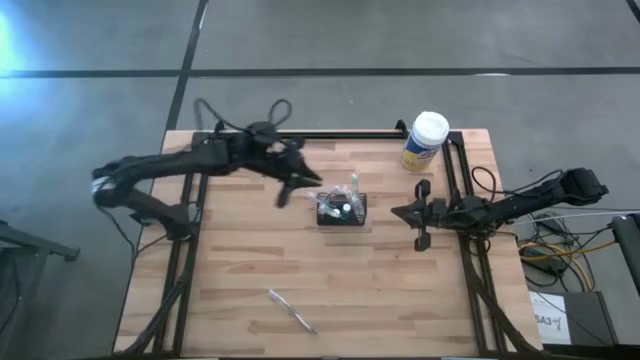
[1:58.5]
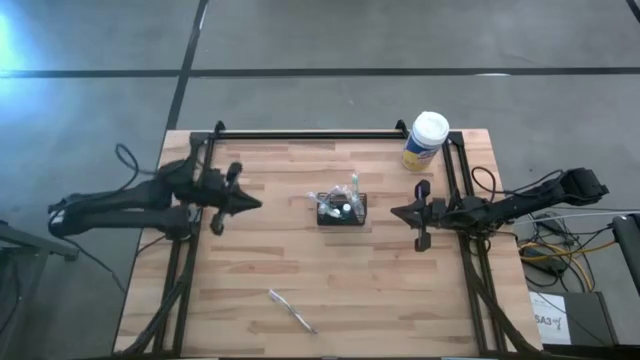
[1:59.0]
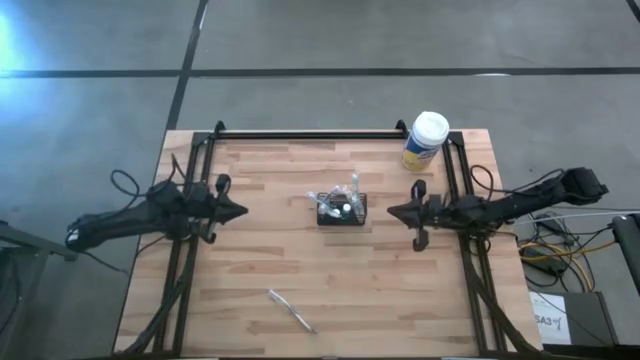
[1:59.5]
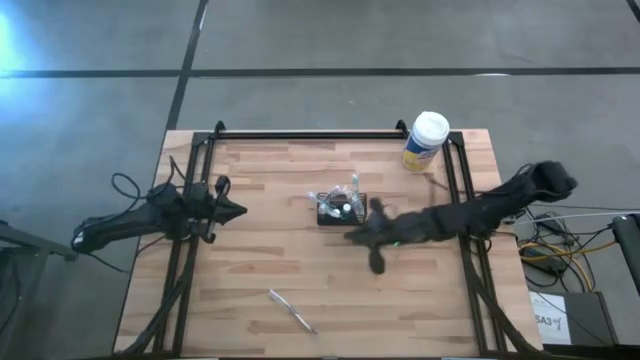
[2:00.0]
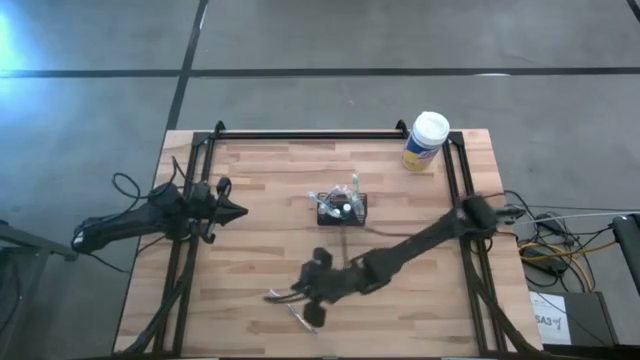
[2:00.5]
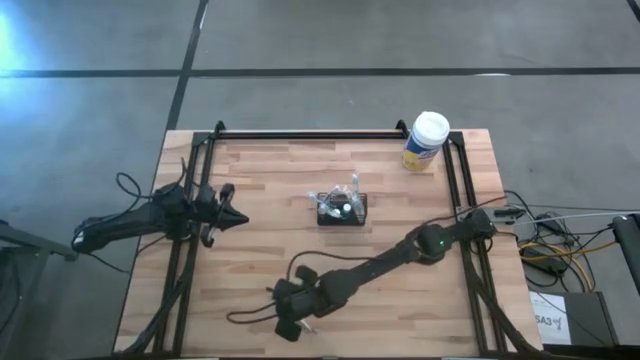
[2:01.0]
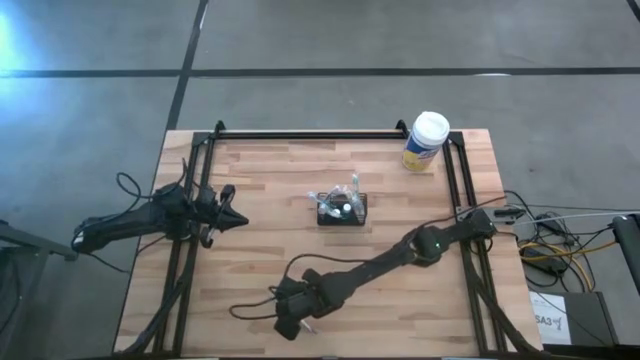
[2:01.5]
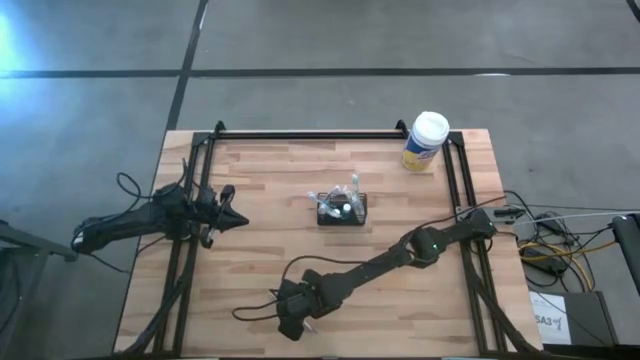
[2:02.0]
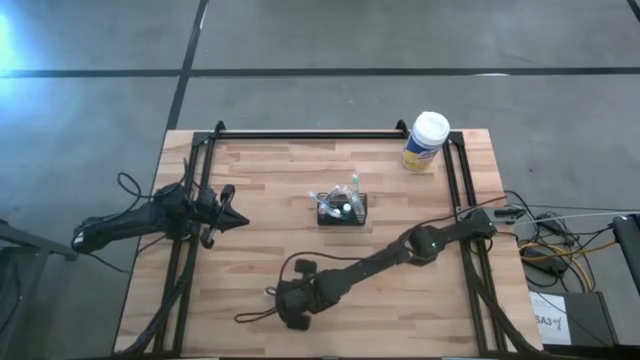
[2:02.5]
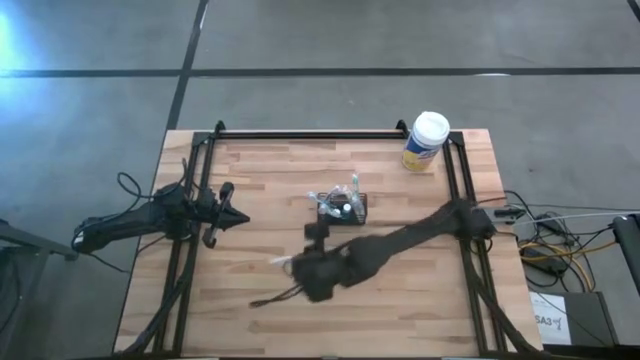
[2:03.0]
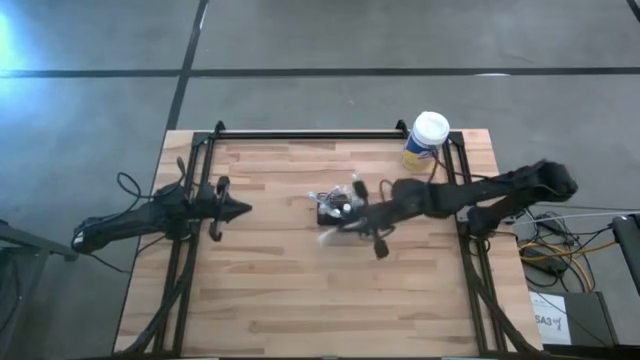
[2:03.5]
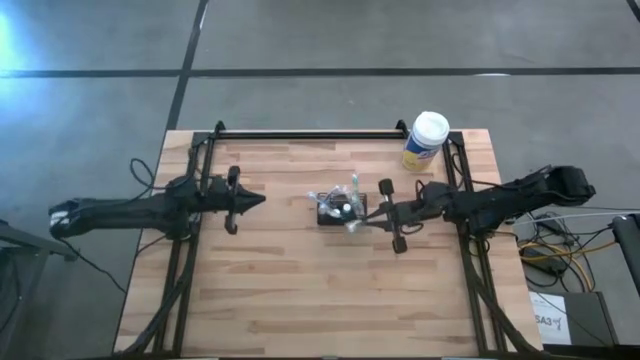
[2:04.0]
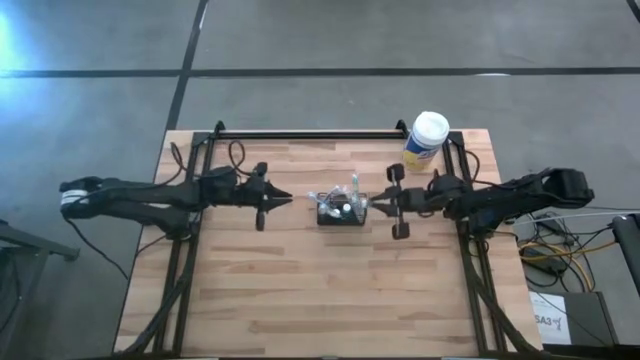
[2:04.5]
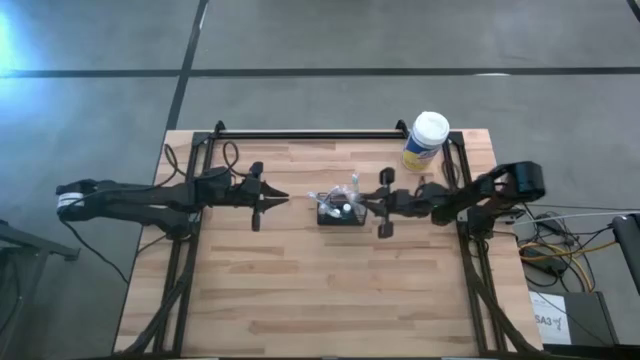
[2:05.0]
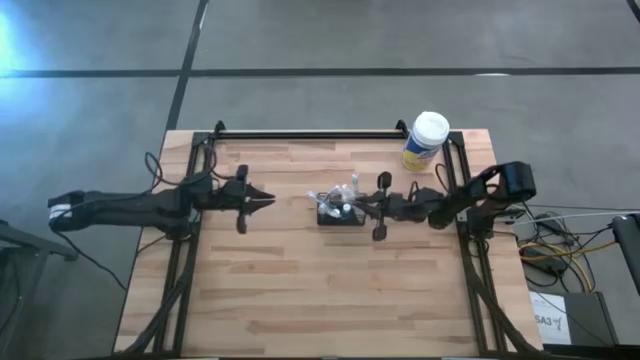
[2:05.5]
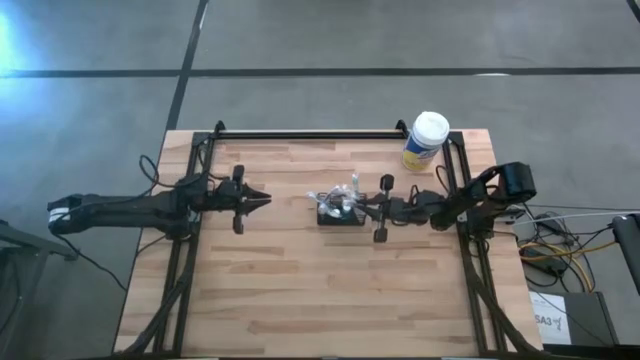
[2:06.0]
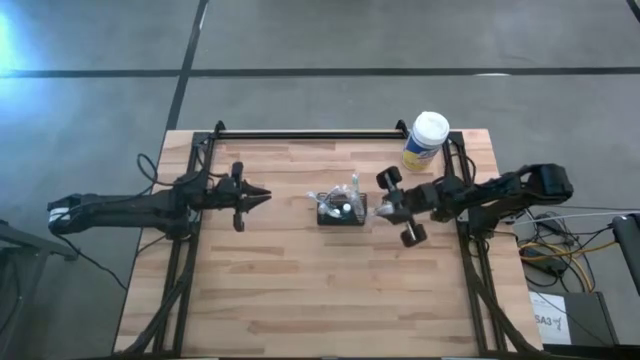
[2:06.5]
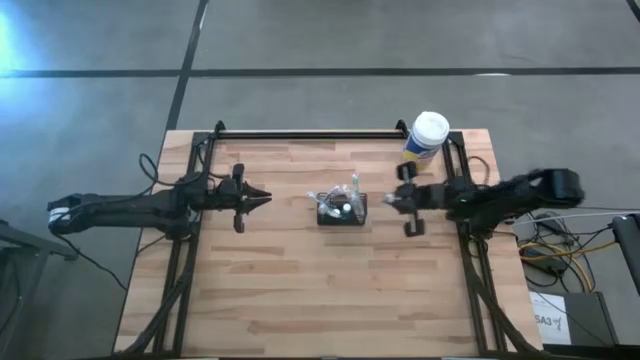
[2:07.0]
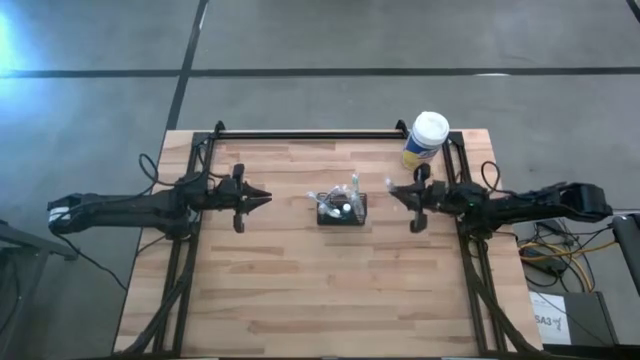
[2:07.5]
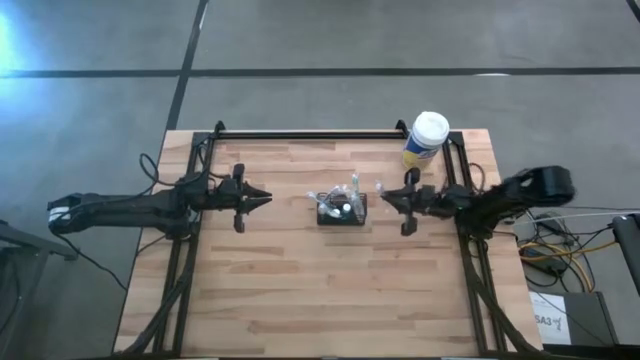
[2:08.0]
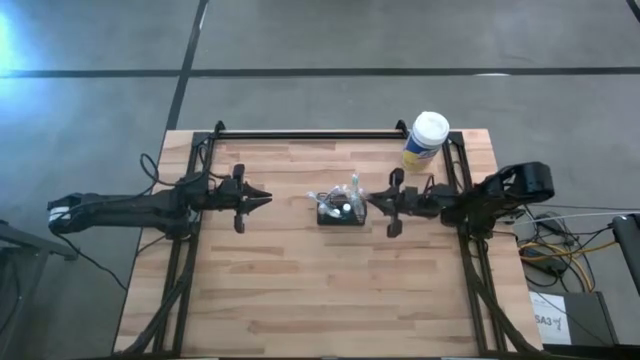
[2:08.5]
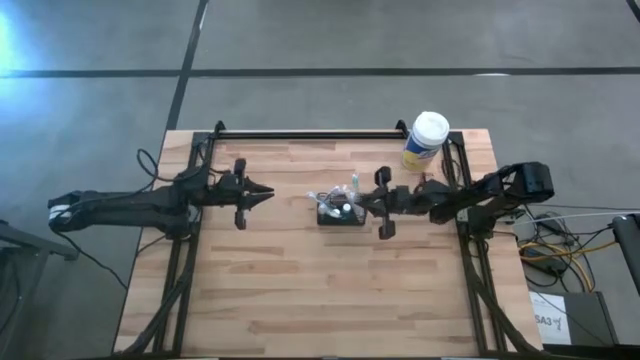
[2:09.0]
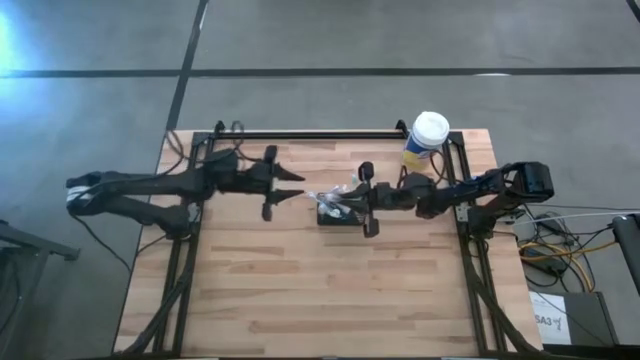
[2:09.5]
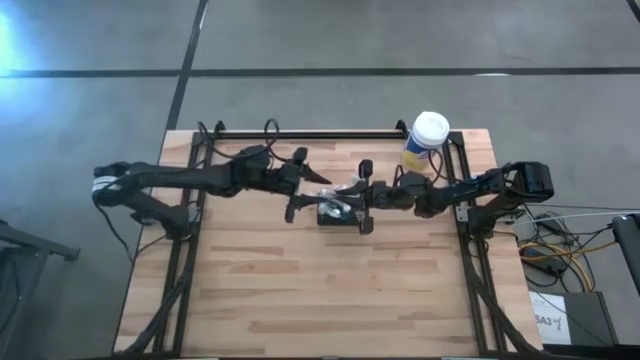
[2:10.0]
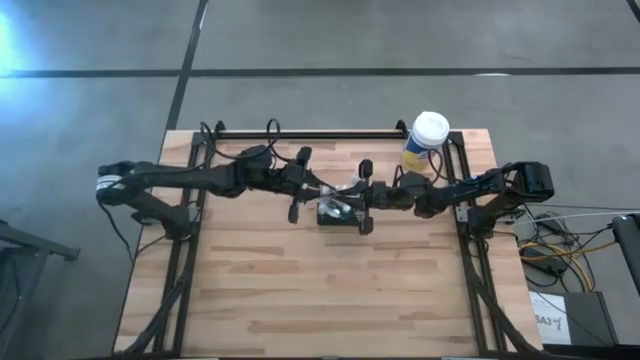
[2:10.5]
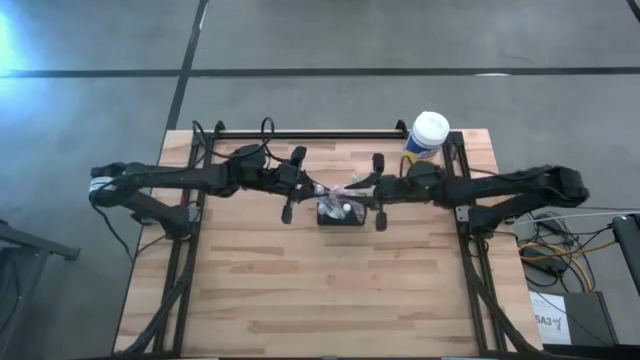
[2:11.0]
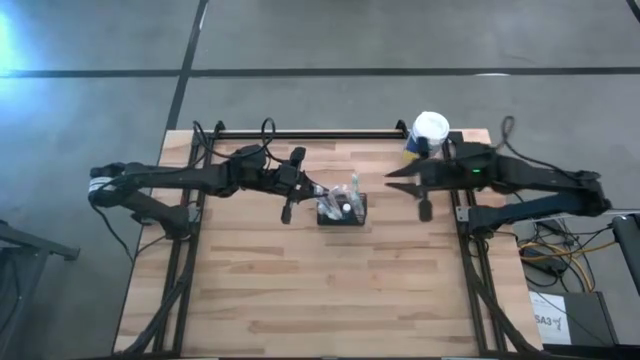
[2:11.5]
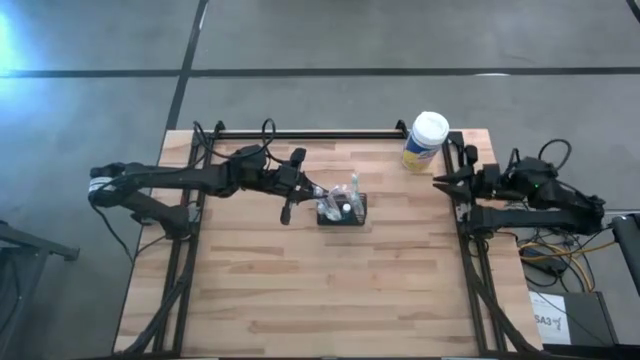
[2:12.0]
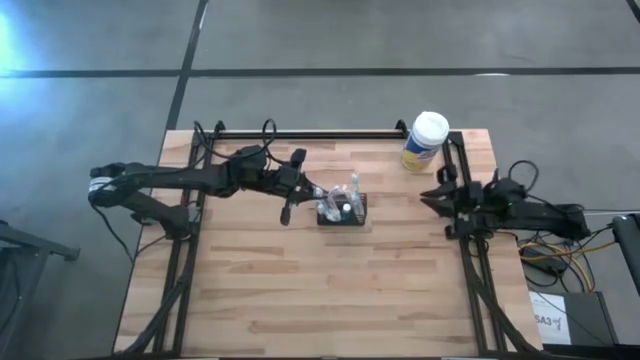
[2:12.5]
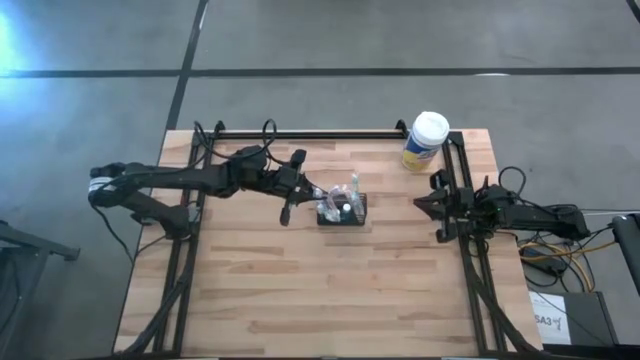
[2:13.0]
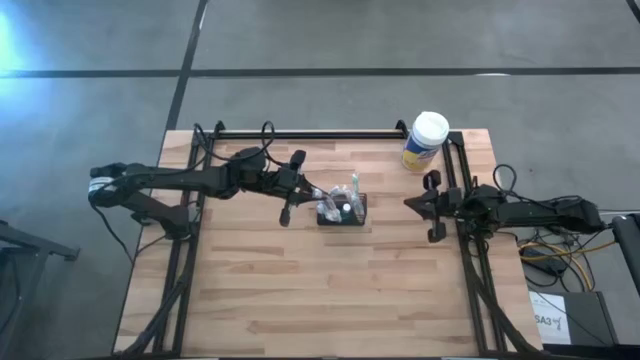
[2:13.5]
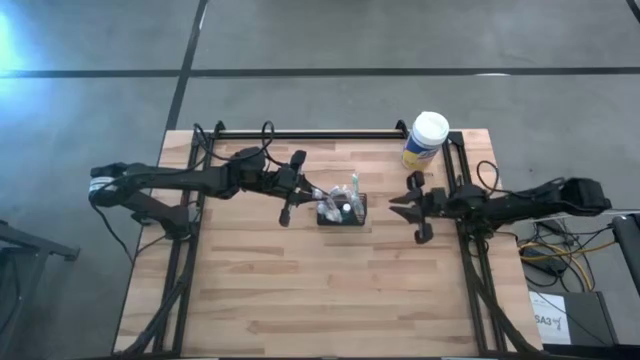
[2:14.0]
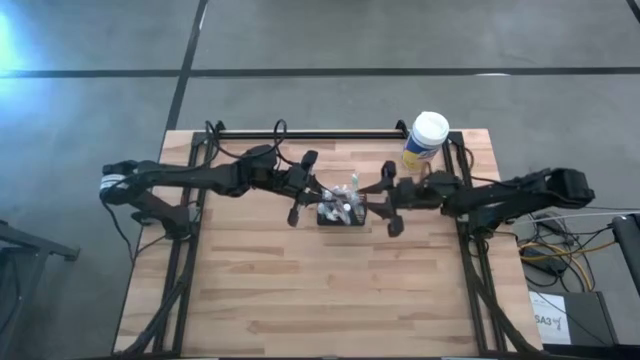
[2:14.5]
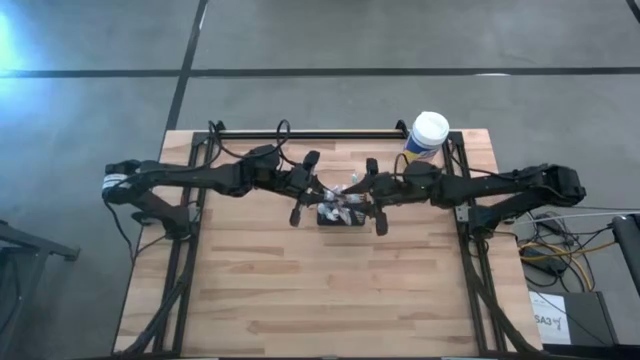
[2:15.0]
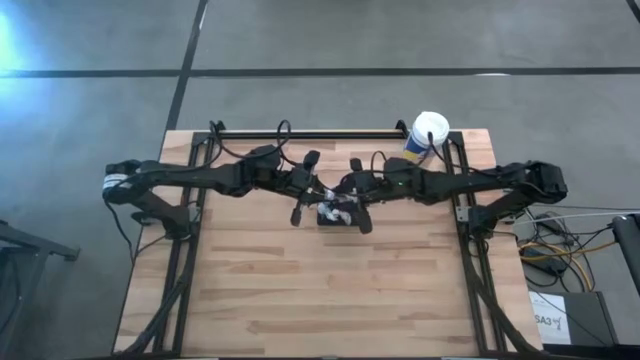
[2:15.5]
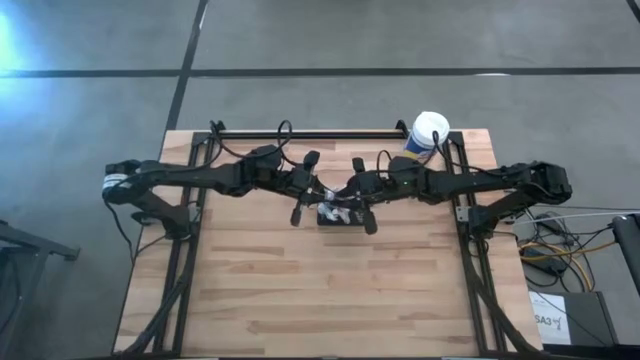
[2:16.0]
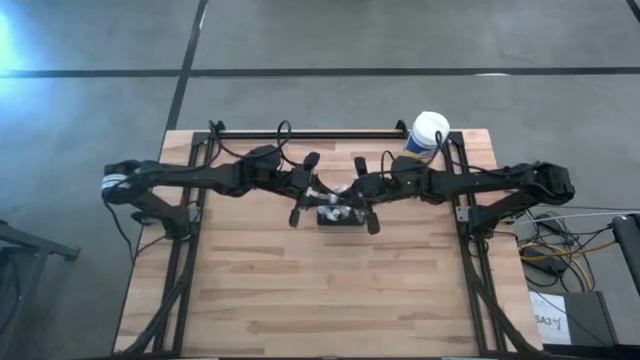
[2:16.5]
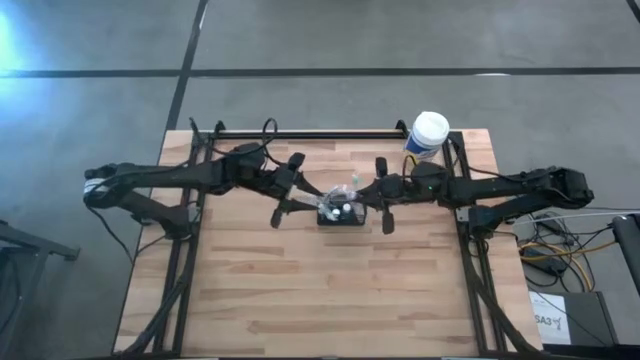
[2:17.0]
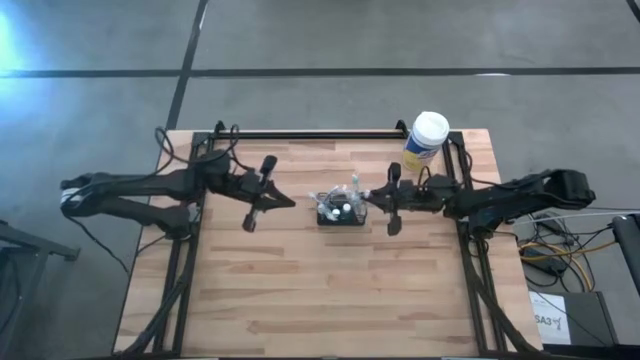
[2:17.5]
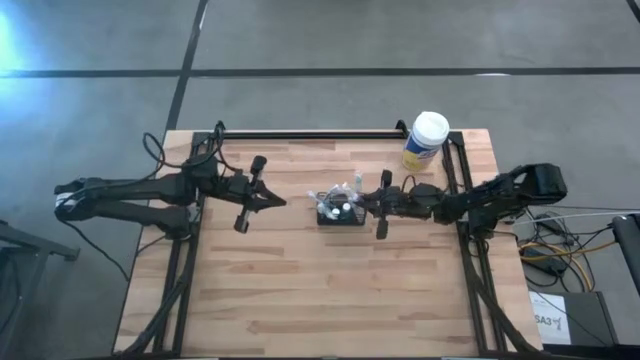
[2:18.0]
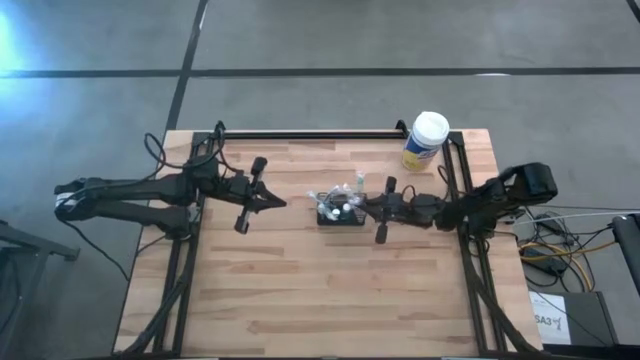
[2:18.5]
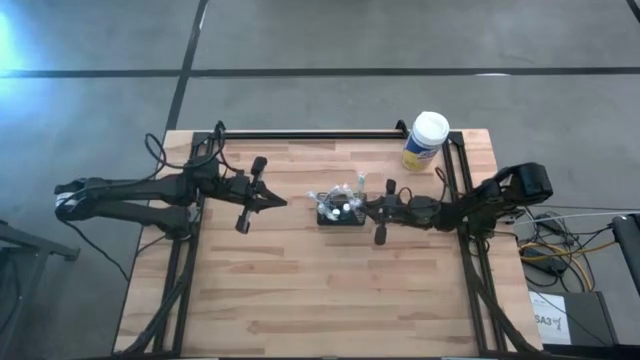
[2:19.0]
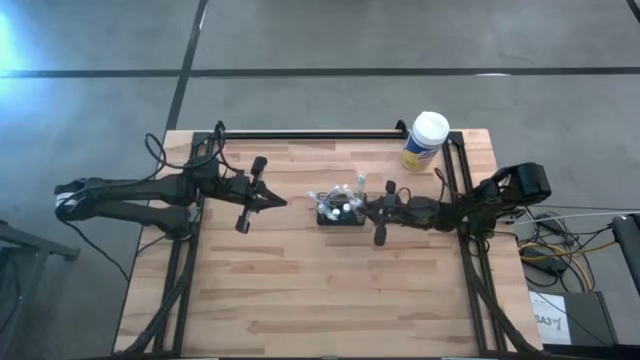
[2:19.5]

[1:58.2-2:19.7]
Task: Pick & Place toothbrushing station
Put the purple toothbrush into the wire organizer
